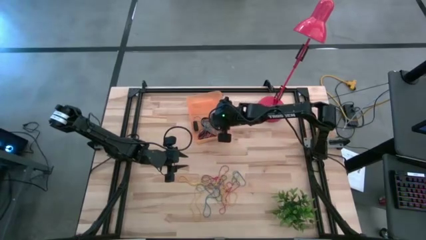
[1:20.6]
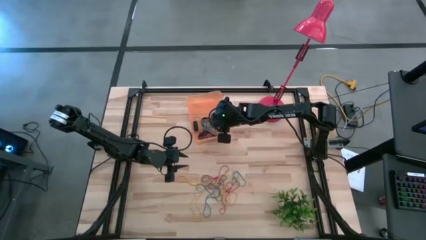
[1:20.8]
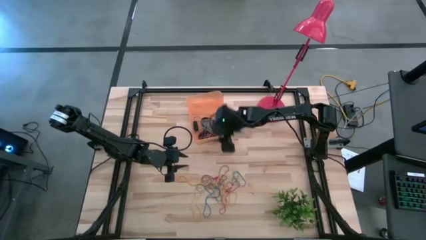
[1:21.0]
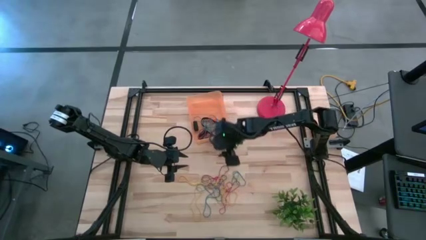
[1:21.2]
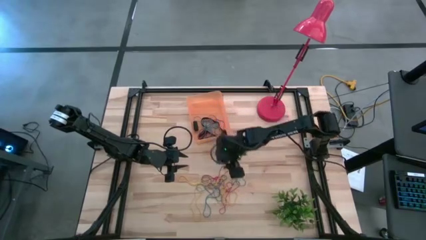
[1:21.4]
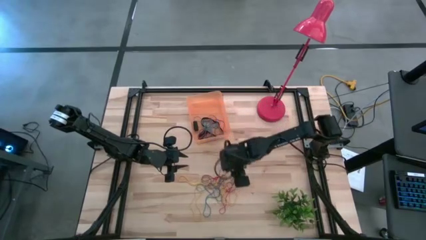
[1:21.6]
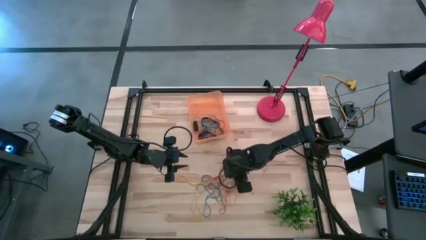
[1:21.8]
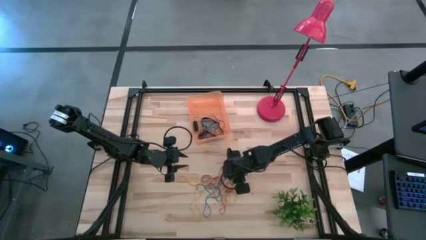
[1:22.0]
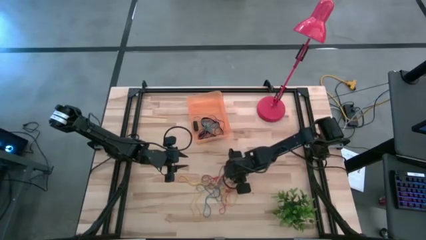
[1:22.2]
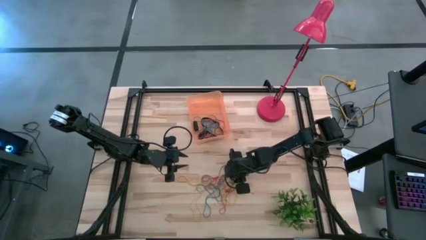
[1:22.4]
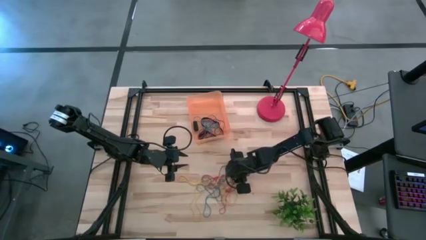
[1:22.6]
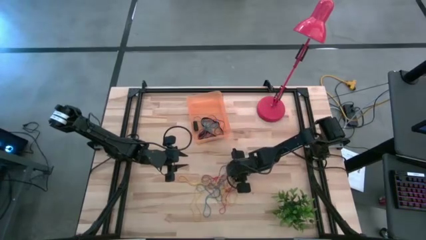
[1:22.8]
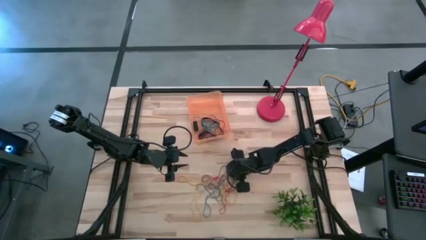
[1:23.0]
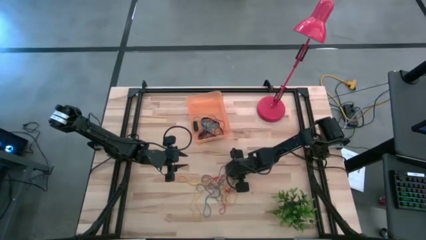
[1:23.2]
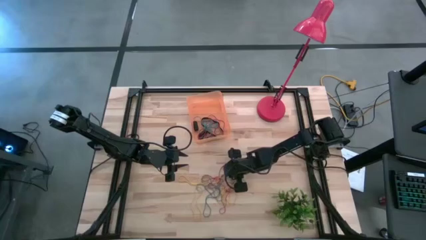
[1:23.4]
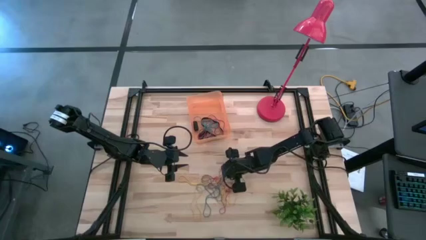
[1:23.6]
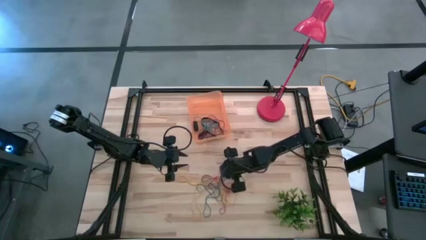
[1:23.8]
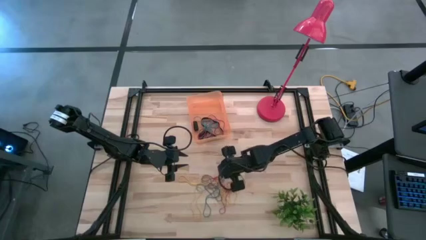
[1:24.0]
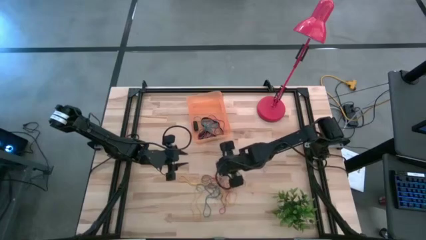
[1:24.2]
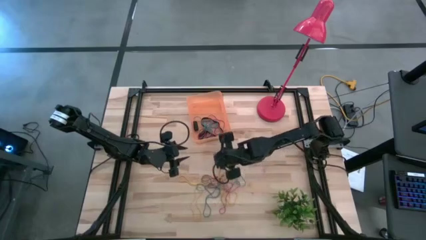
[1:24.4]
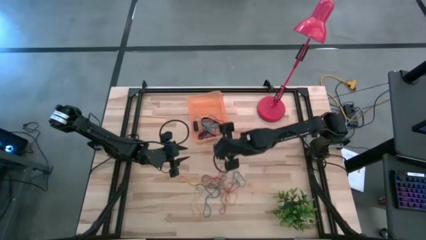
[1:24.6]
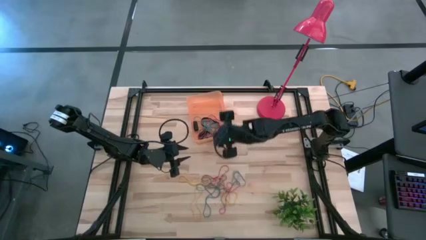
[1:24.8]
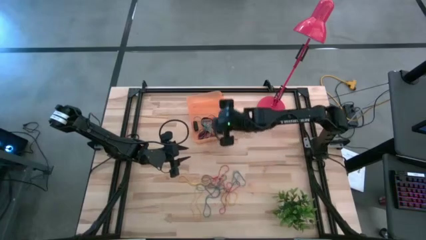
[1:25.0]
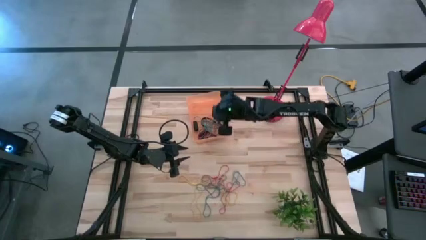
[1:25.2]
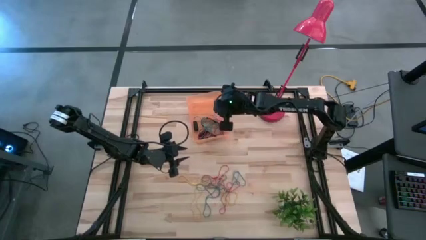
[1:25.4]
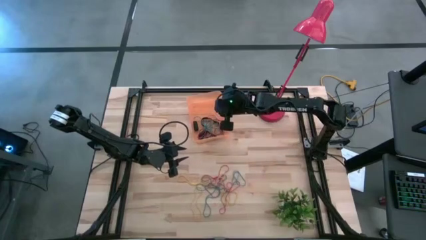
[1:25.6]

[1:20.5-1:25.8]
Task: Pick and place rubber bands into bin
Put the yellow rubber band into the orange bin

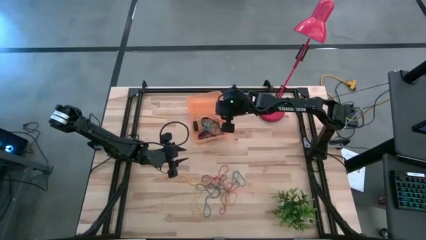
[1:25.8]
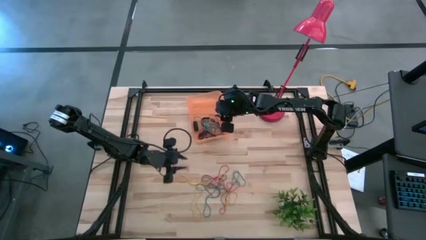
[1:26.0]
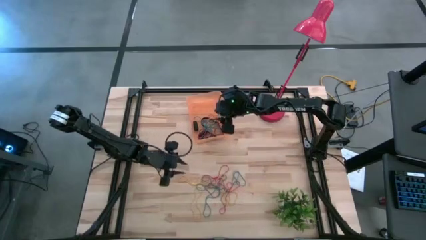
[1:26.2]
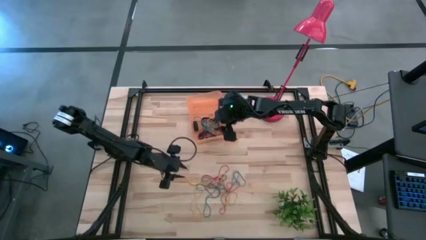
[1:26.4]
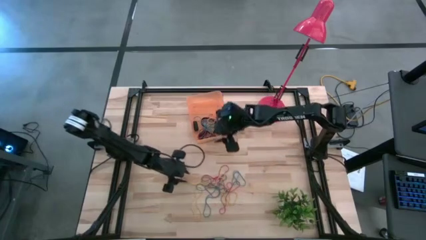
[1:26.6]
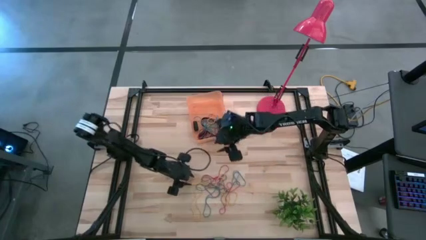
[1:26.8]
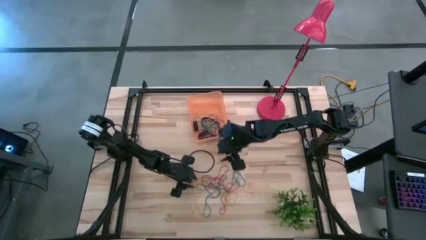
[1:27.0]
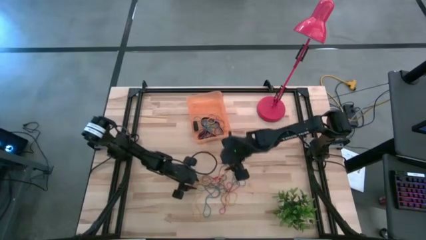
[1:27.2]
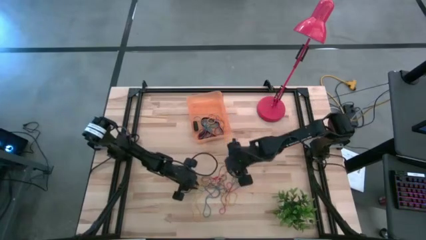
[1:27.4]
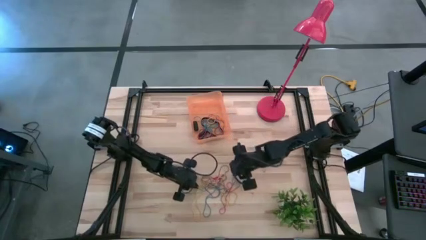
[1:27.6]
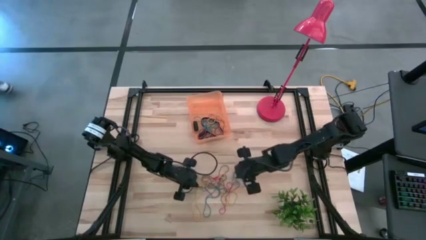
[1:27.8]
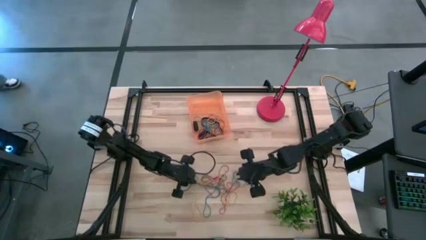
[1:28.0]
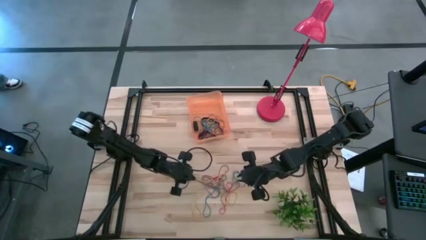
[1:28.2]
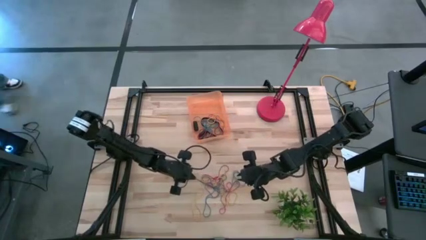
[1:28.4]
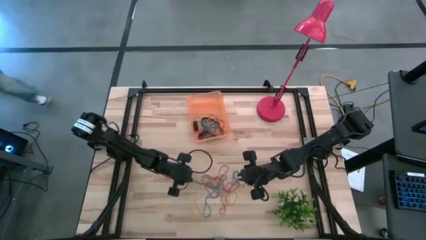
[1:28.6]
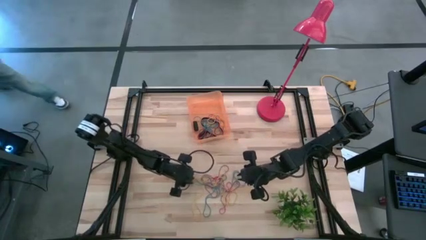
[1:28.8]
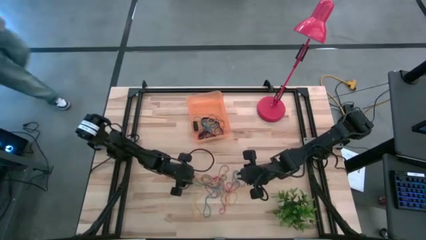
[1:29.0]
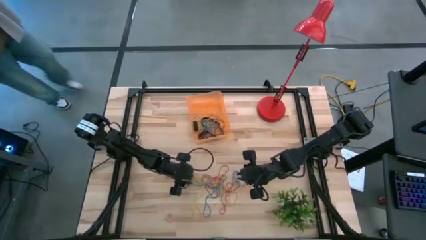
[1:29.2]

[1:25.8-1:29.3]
Put the yellow rubber band into the orange bin

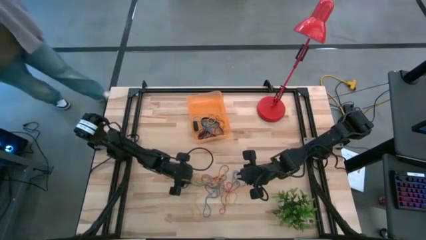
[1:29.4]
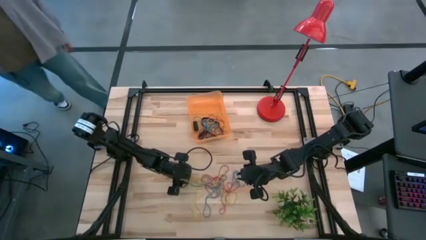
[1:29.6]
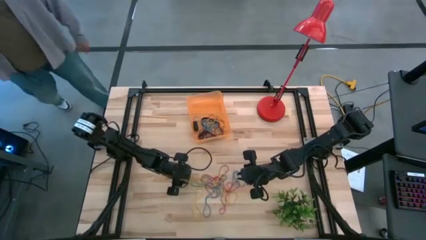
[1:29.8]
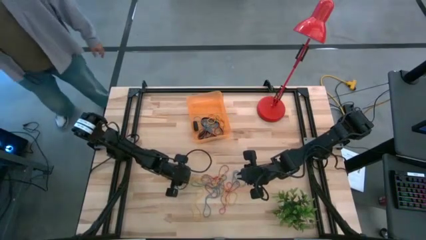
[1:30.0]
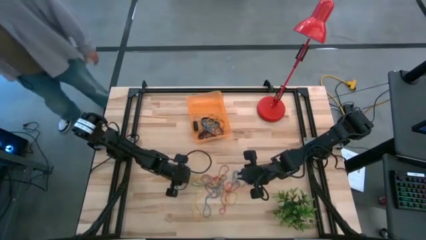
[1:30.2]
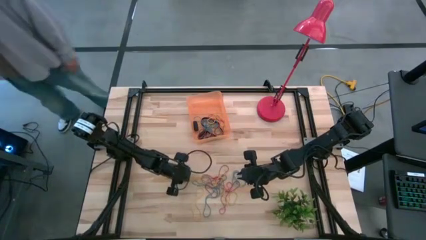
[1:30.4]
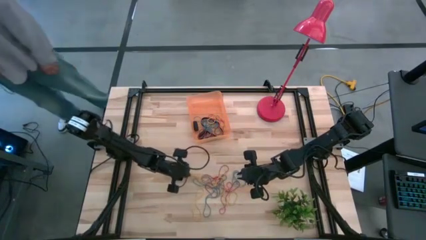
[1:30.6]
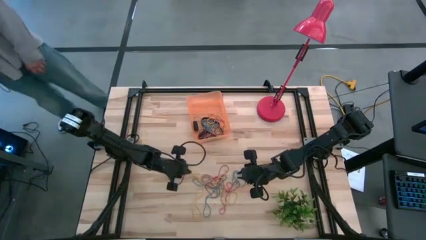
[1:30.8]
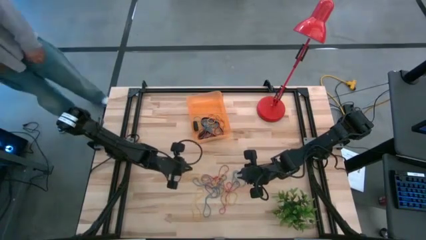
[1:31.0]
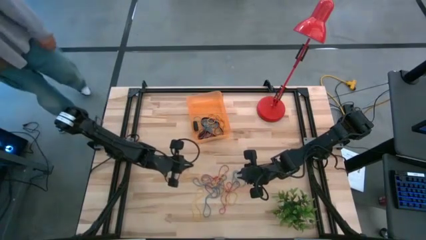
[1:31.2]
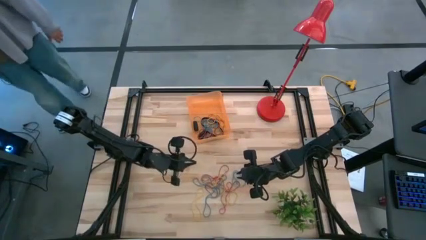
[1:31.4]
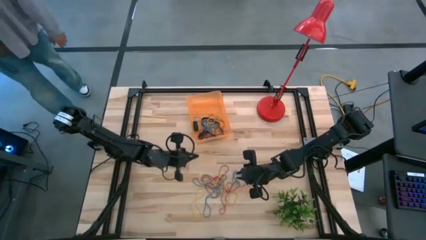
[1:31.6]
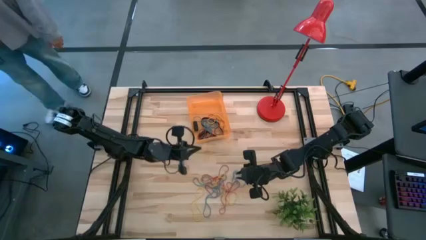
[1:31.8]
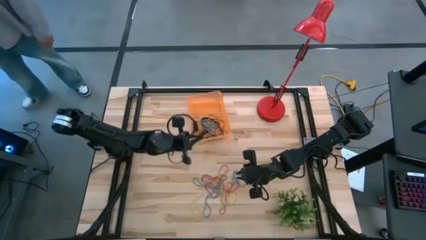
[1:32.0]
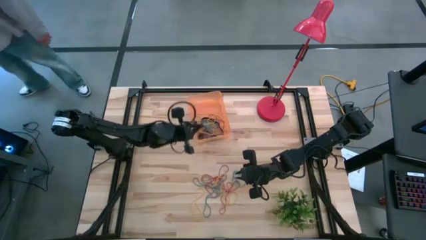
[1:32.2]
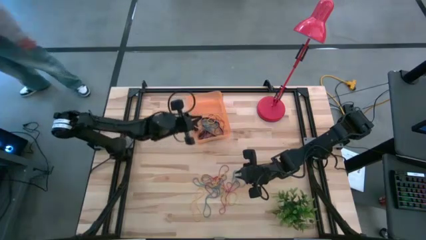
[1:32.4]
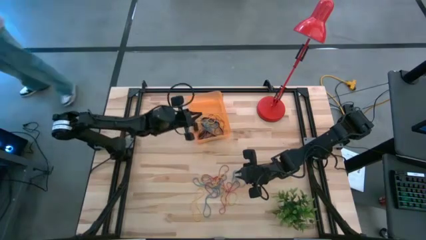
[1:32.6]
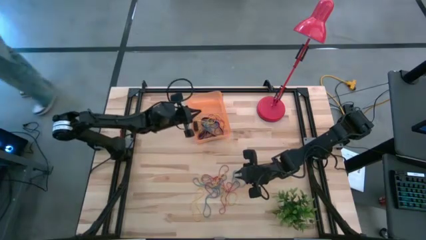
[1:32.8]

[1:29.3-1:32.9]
Put the yellow rubber band into the orange bin

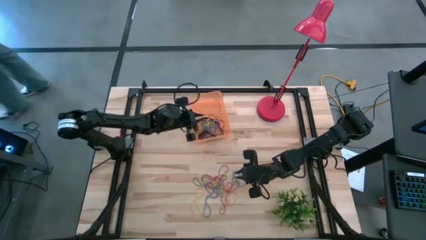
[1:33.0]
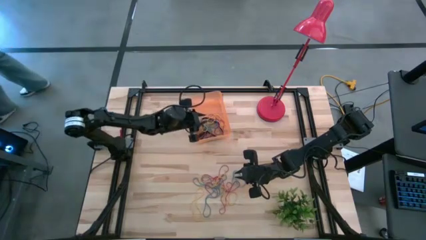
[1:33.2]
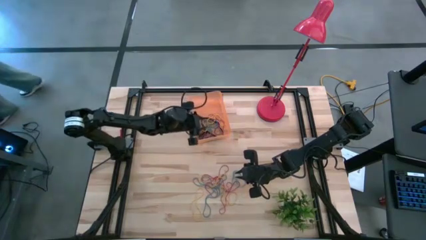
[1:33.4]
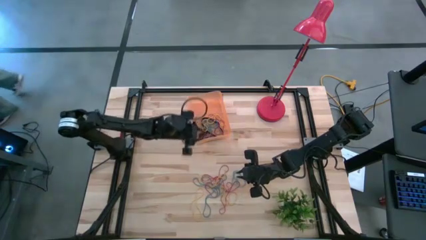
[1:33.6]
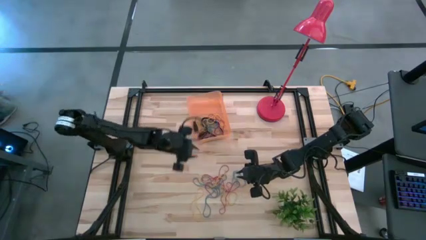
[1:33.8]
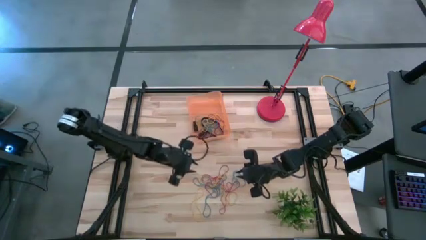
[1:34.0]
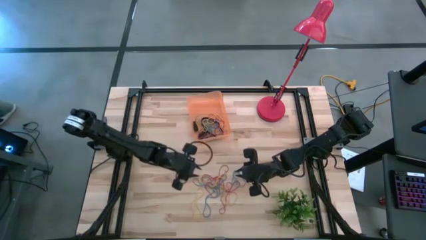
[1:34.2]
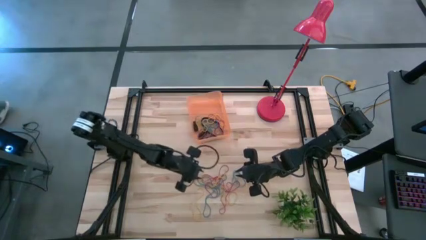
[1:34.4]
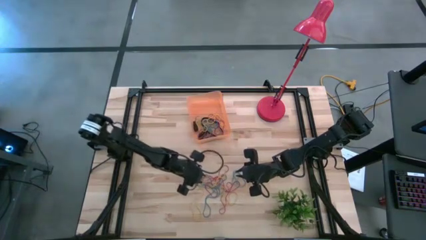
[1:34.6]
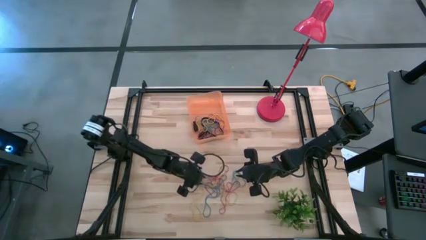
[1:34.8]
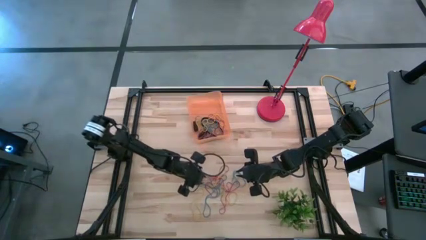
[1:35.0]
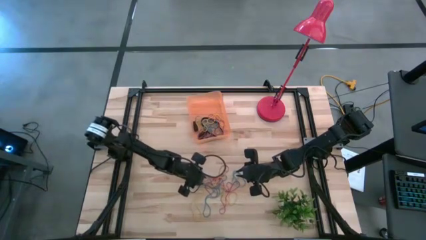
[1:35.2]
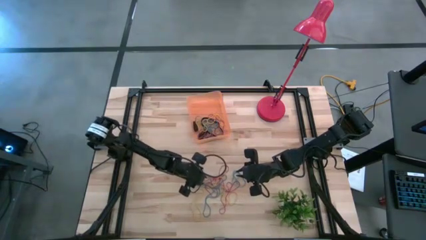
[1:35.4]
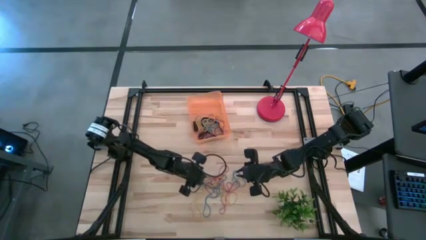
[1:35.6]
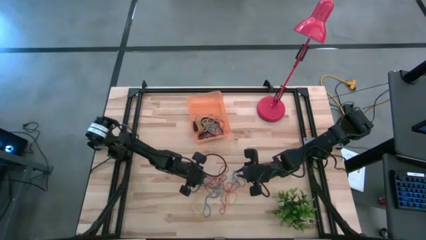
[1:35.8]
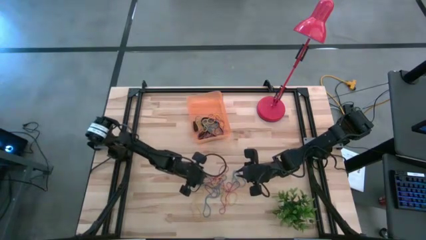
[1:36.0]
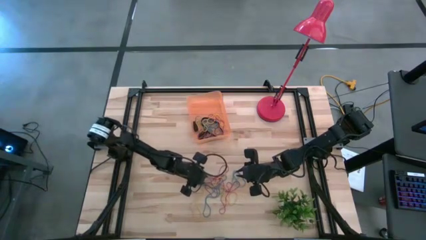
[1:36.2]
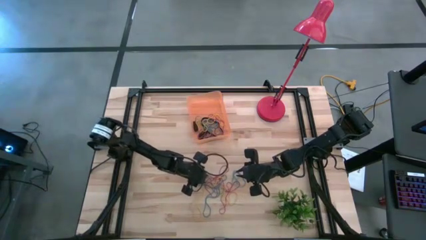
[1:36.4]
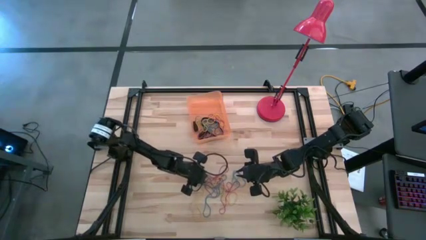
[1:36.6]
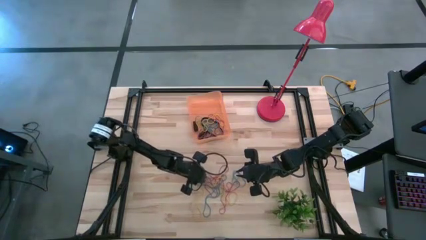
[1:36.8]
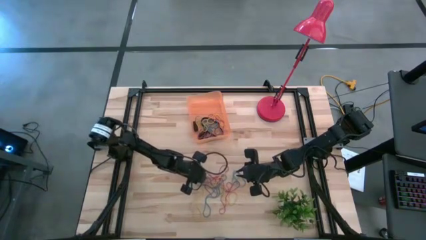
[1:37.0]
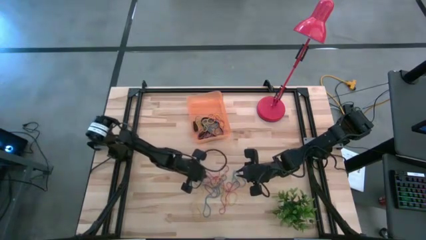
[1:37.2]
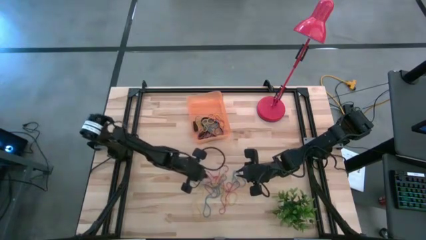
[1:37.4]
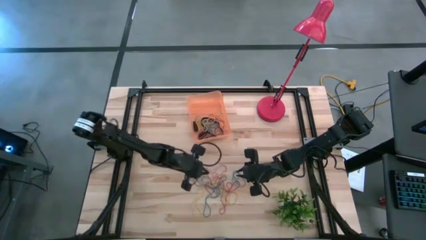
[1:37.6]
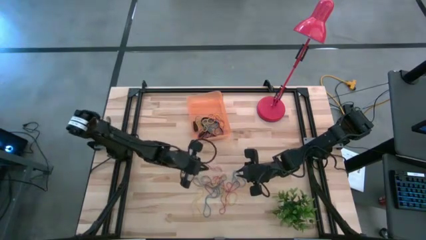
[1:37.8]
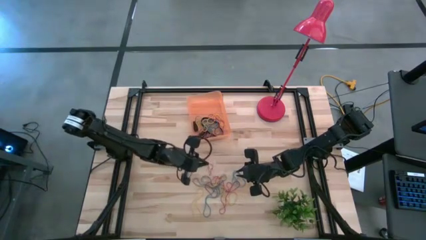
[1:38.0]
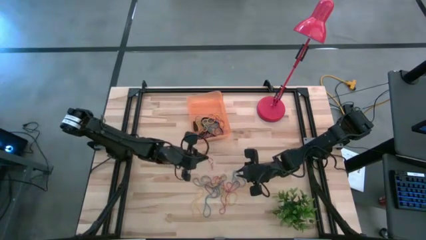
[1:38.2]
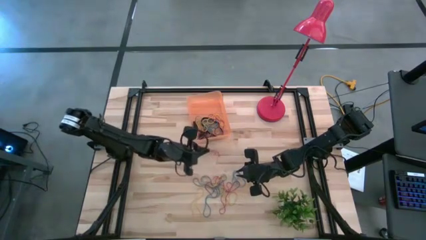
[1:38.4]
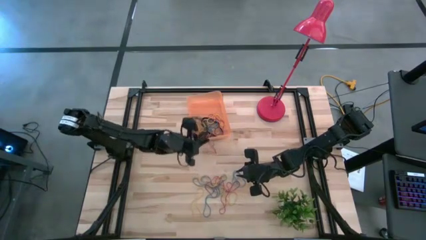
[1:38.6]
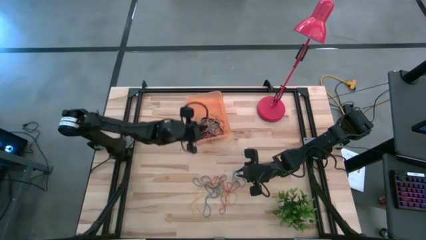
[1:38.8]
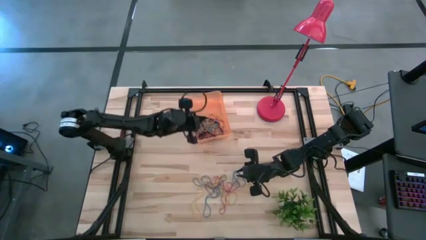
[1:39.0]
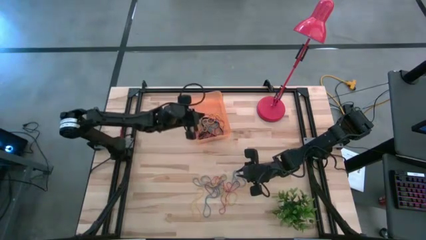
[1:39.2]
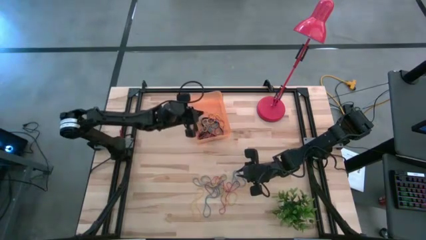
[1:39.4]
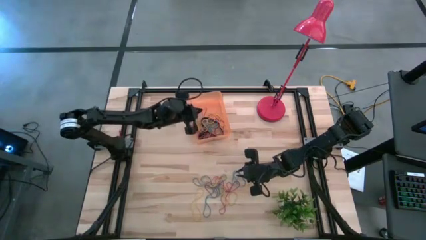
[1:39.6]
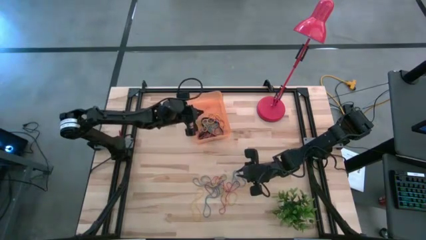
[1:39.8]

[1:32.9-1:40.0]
Put the red rubber band into the orange bin
